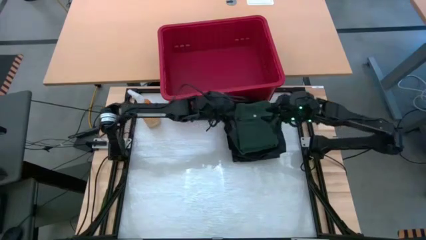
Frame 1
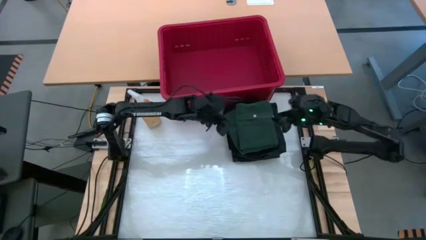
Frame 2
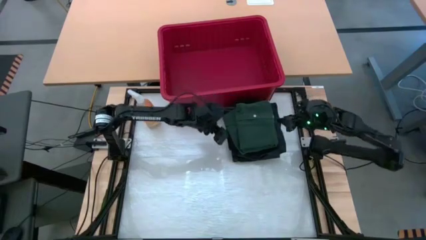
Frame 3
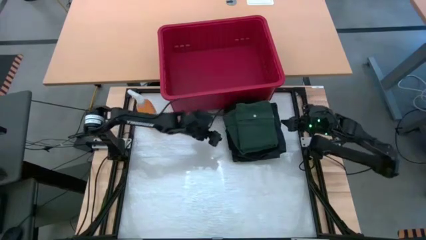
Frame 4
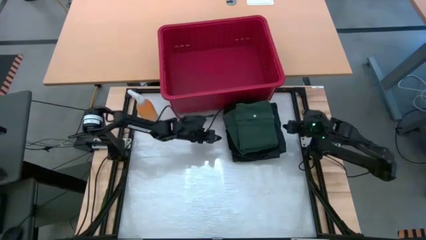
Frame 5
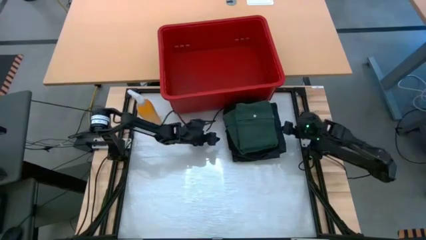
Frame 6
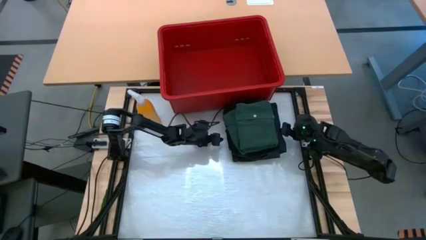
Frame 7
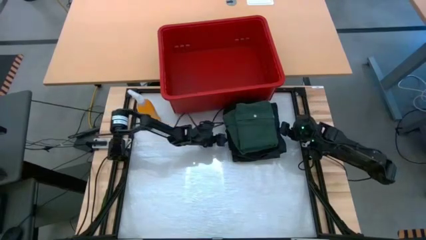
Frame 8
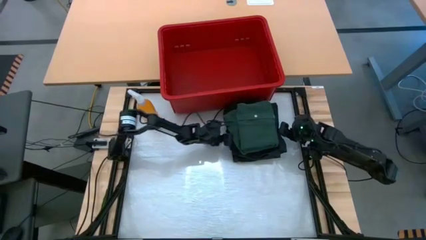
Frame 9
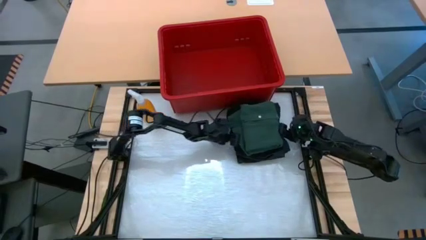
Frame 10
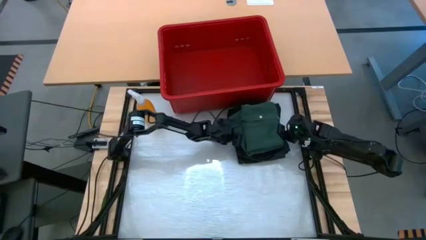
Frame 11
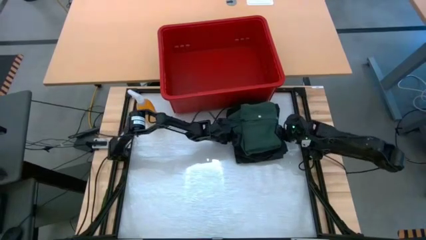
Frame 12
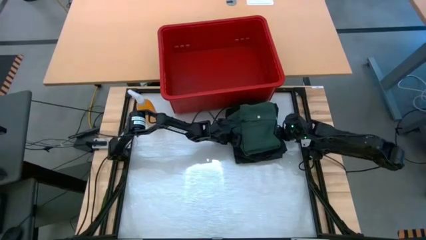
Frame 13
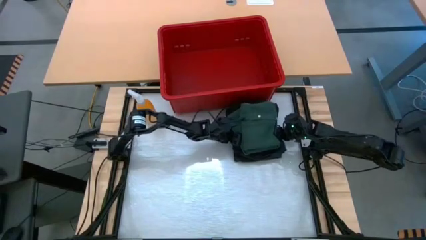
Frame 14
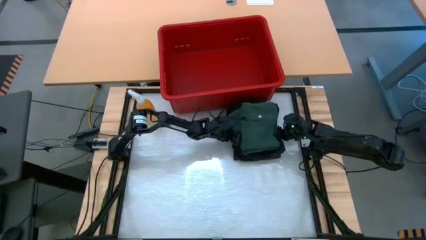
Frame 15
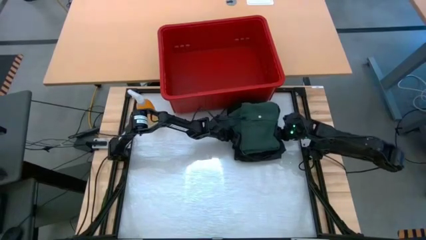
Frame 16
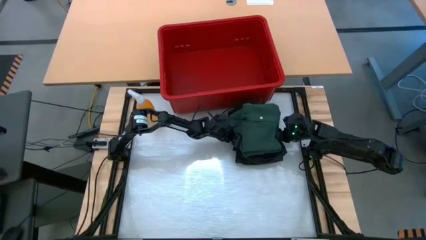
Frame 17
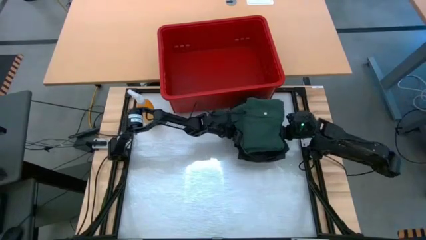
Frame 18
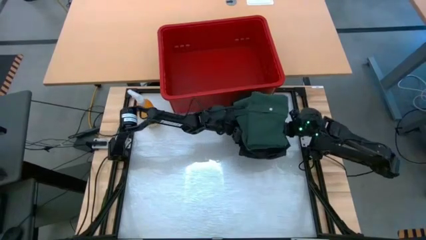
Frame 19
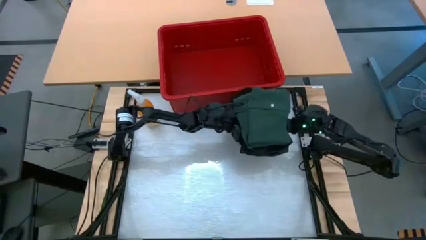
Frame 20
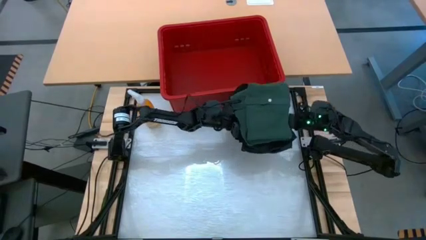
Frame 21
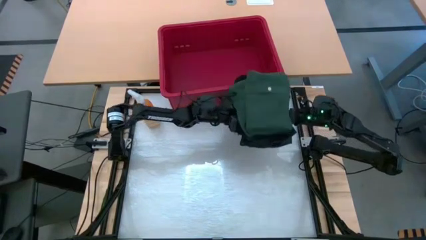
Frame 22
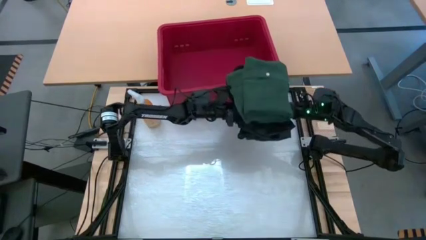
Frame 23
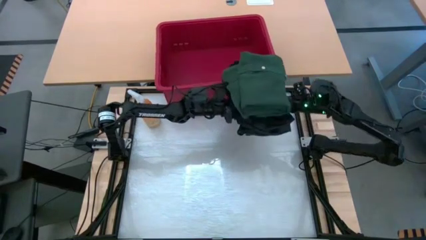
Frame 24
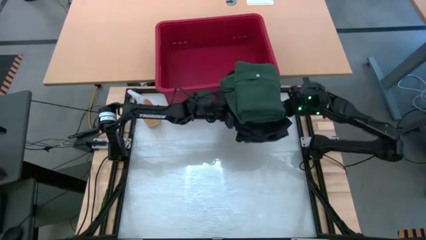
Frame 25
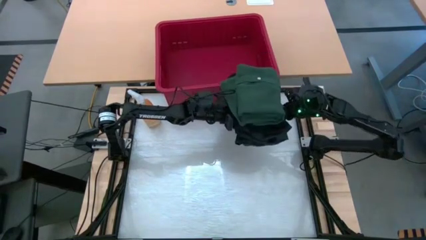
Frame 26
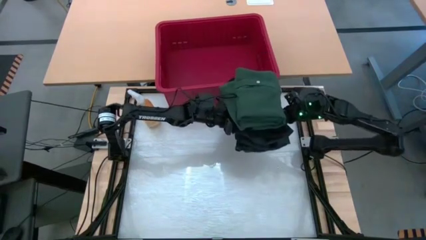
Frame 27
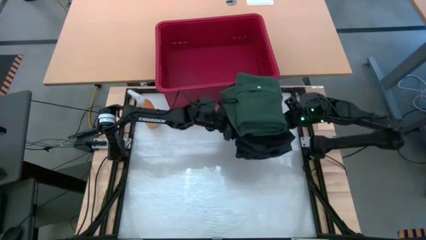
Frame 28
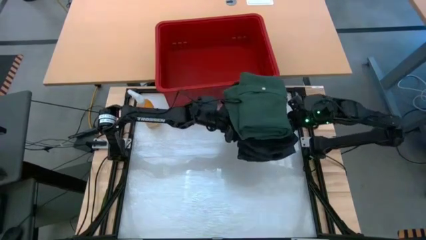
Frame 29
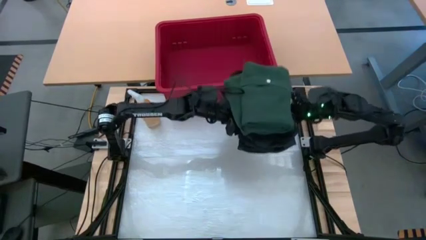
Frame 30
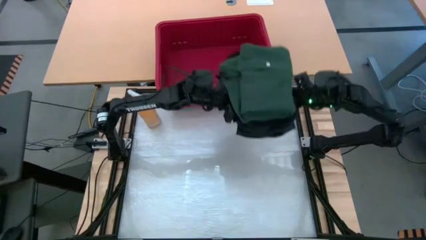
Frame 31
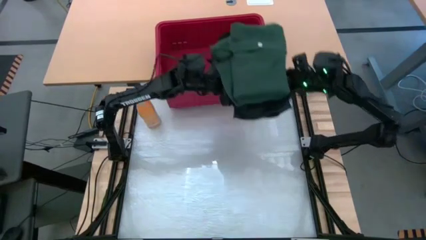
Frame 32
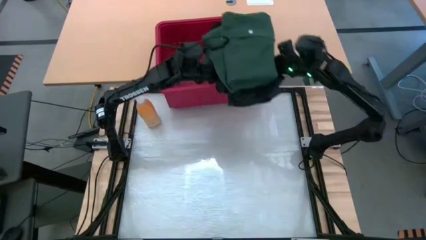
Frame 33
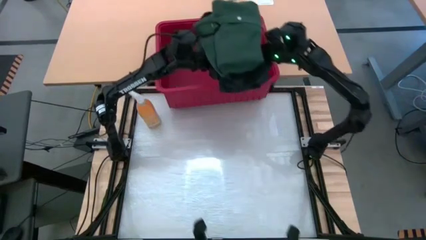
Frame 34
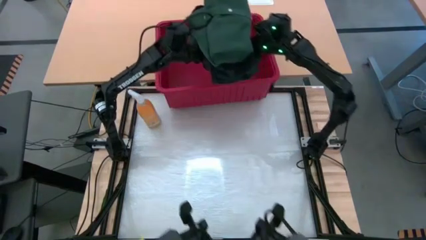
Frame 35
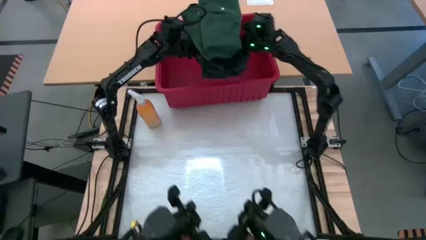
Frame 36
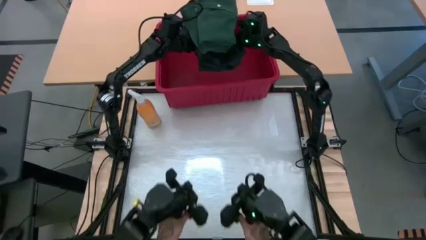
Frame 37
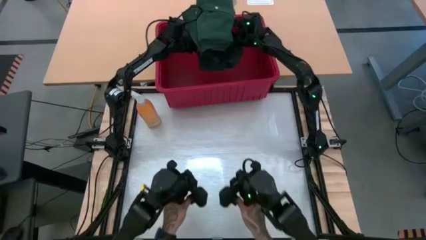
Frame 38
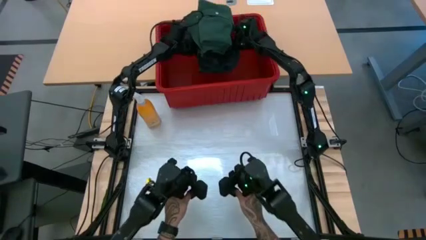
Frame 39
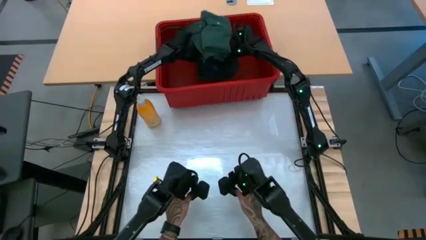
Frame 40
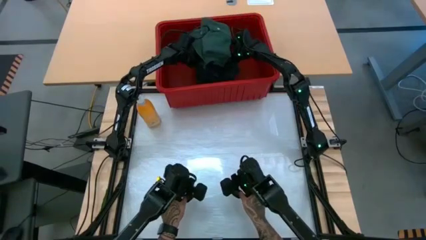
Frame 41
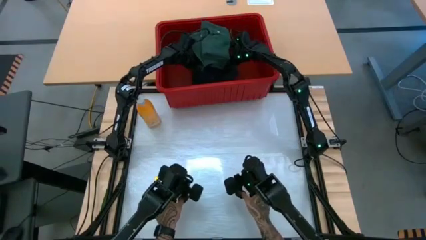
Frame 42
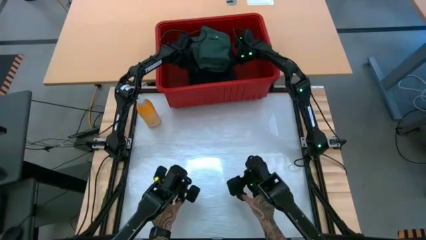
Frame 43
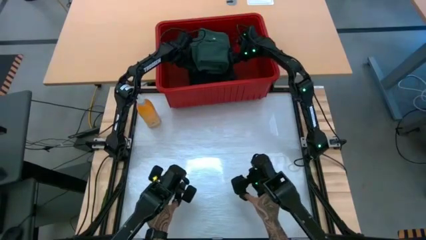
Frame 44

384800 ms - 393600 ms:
Task: Fold Laundry from Bin
Put the stacked clothes into the red bin

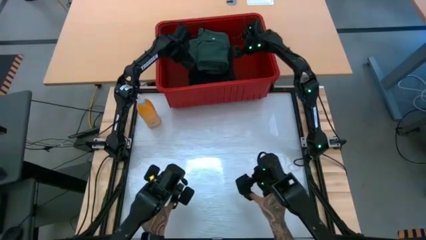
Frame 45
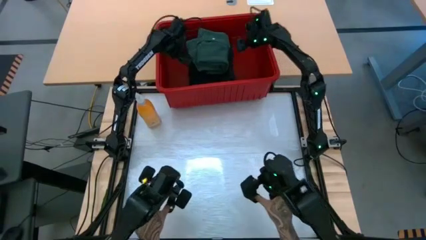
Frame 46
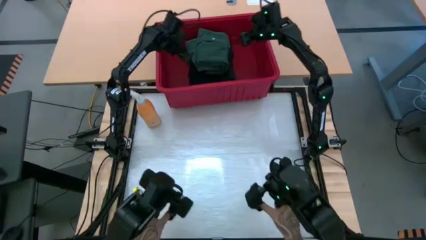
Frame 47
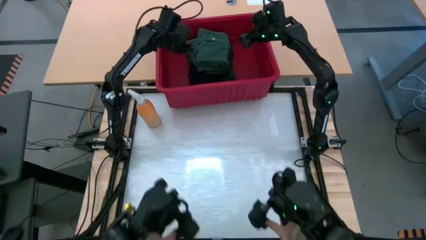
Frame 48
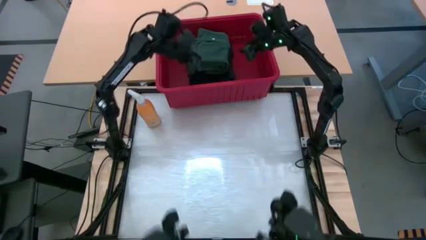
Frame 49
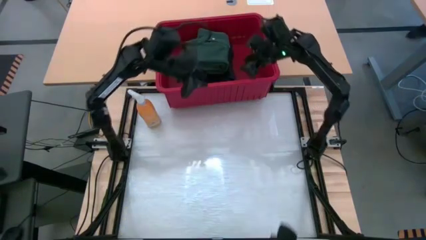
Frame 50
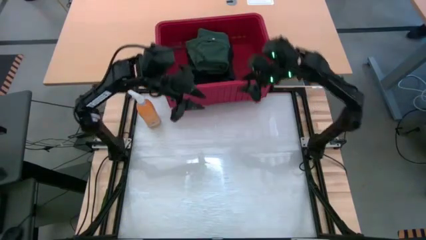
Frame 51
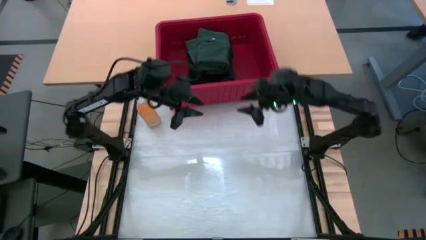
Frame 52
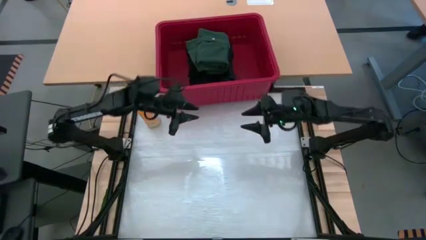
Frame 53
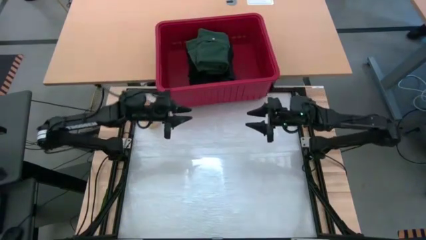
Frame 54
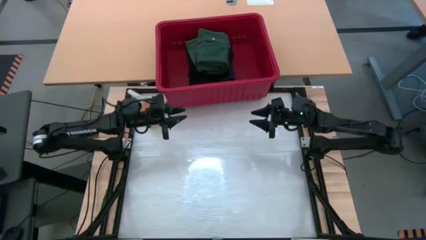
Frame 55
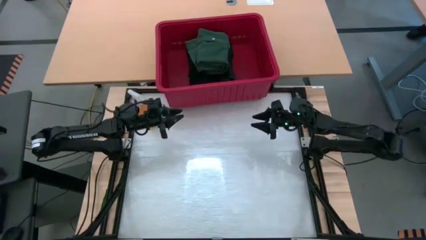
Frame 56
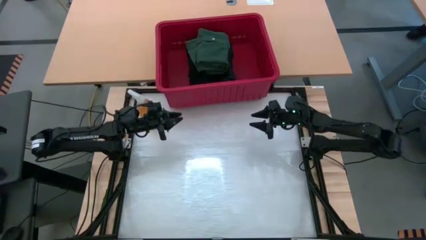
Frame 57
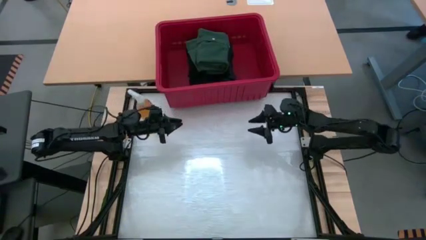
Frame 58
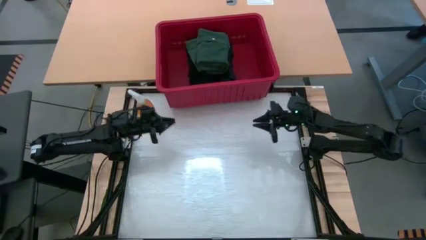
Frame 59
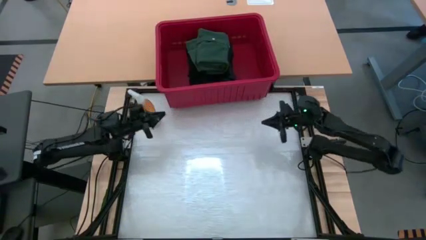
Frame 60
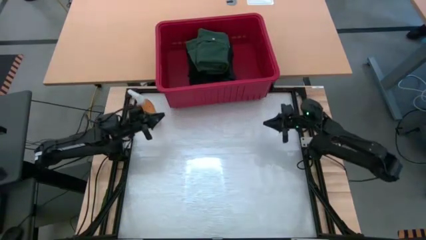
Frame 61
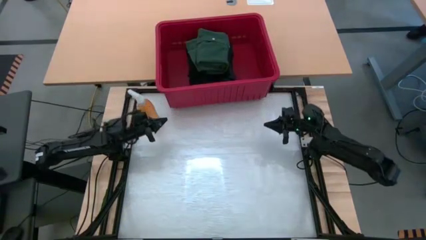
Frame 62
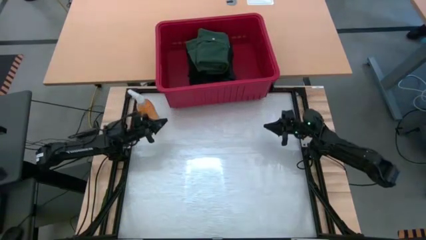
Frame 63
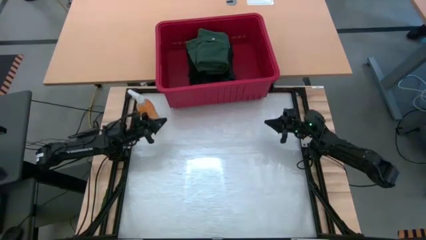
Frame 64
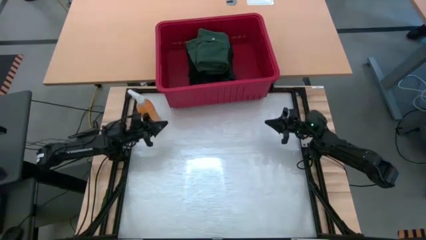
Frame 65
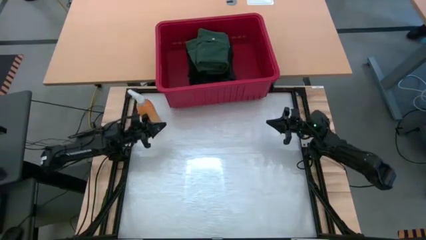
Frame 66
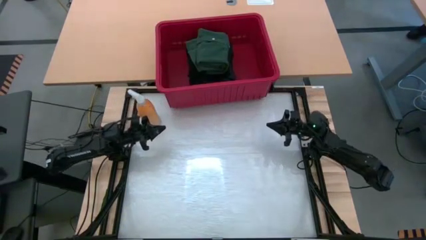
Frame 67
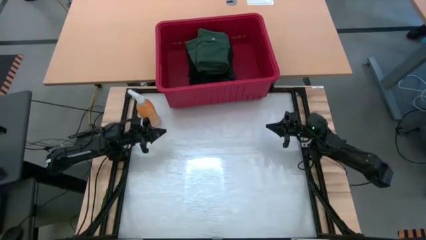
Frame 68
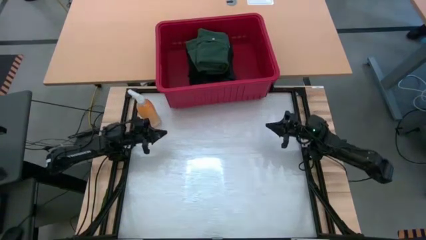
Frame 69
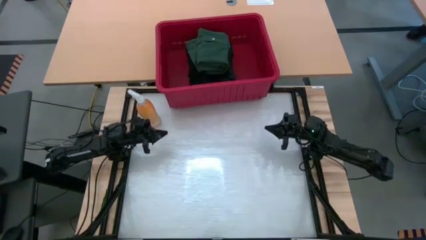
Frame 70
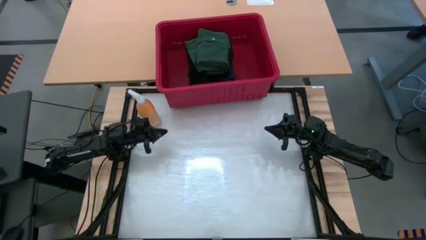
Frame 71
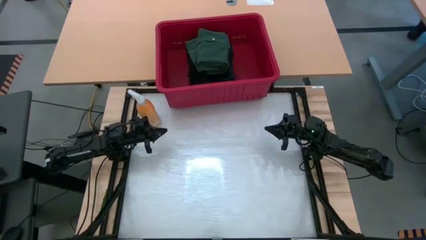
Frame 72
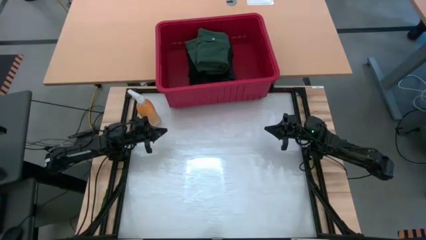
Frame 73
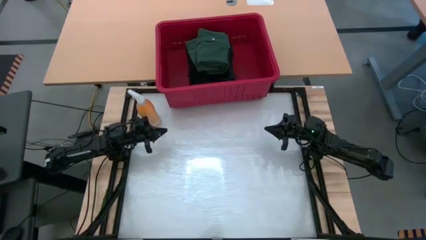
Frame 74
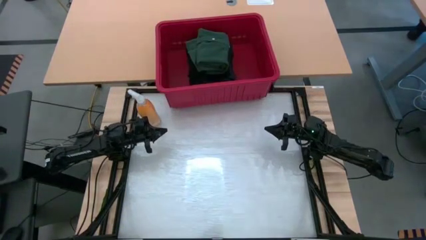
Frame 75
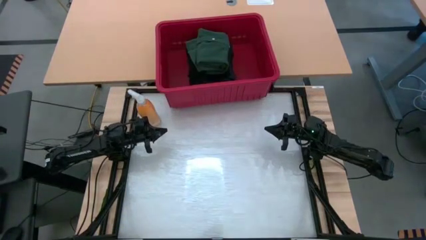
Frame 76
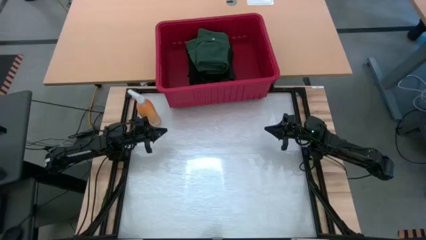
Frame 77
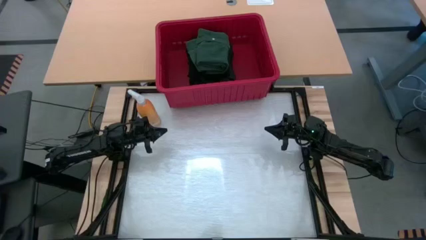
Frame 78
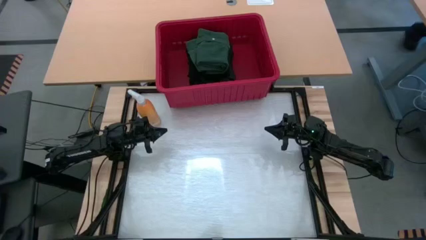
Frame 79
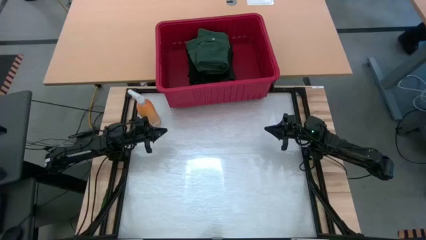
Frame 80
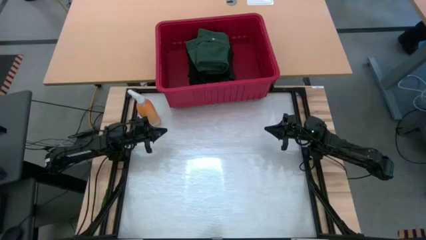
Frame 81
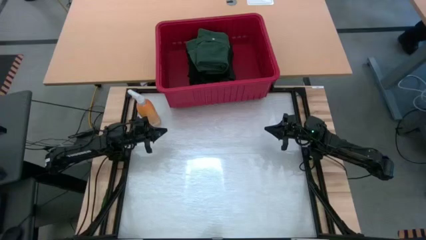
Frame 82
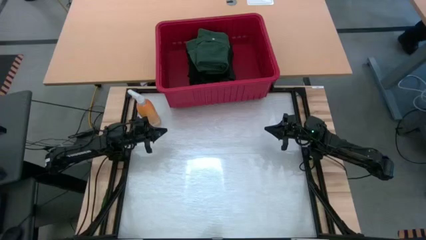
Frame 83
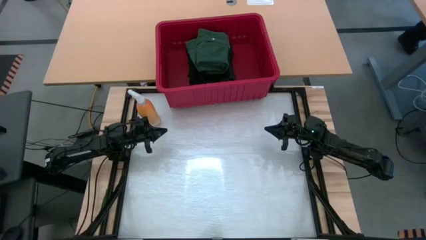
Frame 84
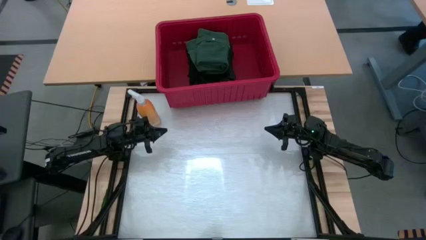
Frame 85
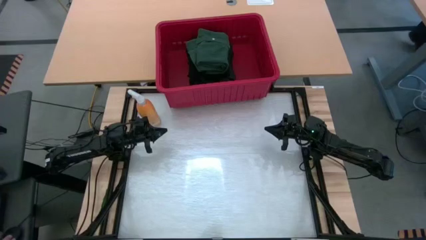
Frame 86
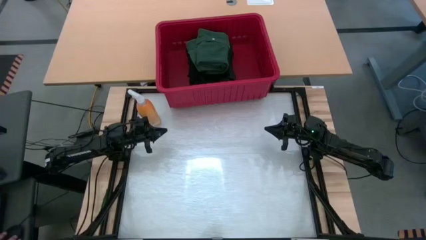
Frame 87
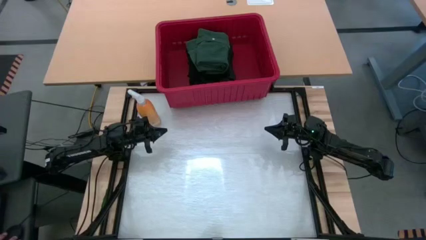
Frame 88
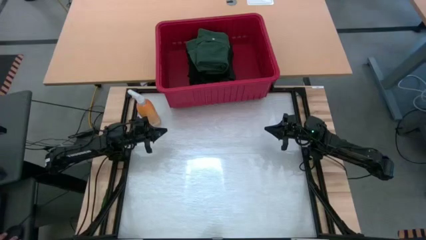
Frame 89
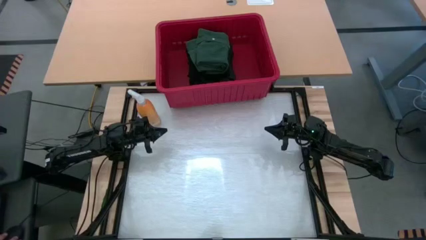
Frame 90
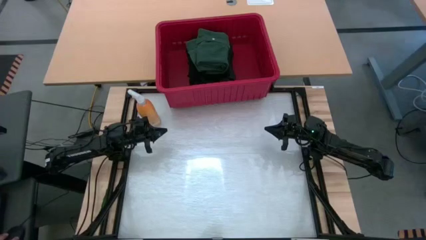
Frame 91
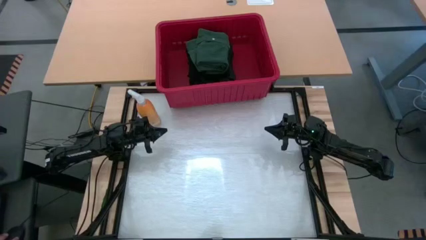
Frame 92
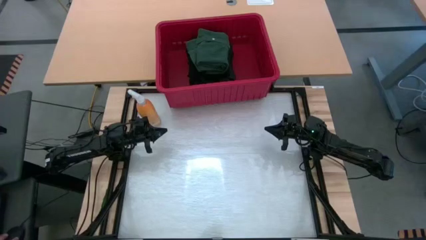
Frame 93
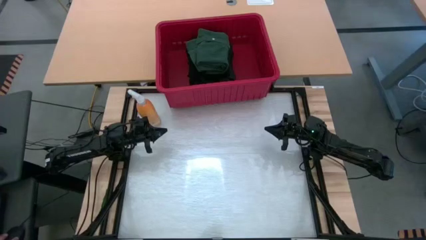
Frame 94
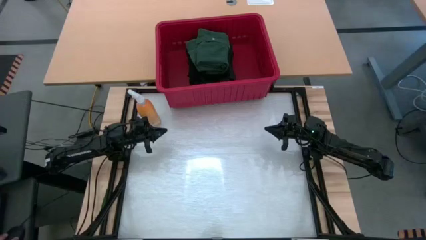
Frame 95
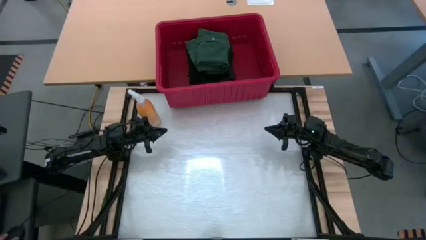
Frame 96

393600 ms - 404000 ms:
Return to Home Position
